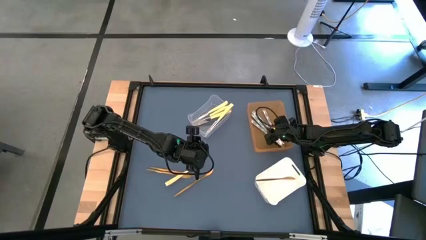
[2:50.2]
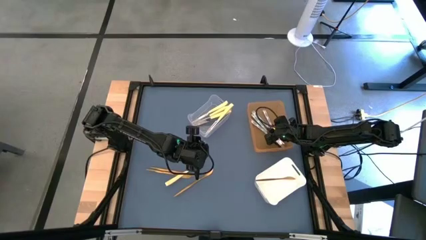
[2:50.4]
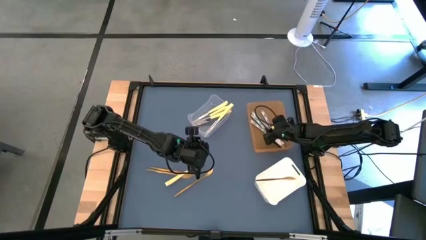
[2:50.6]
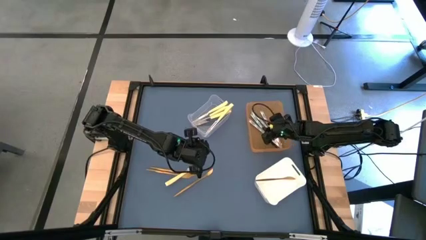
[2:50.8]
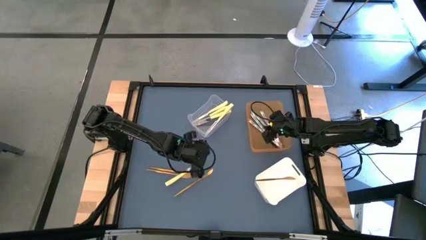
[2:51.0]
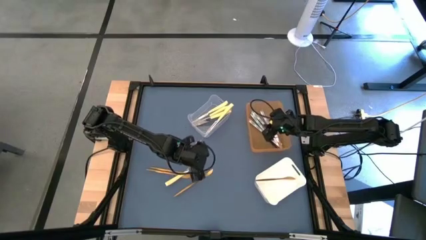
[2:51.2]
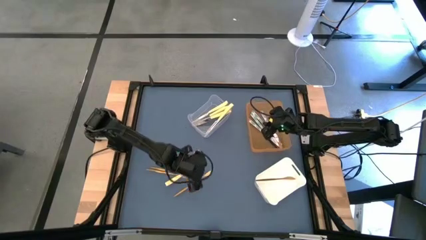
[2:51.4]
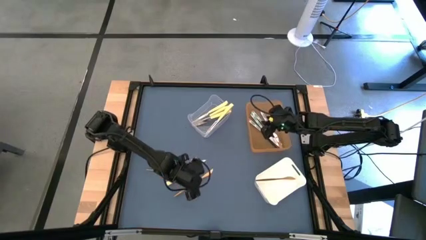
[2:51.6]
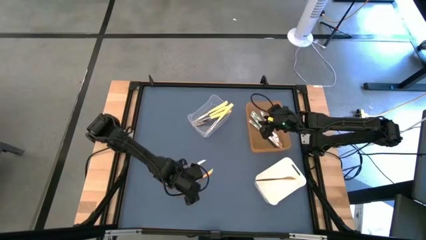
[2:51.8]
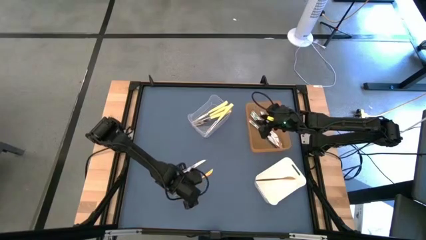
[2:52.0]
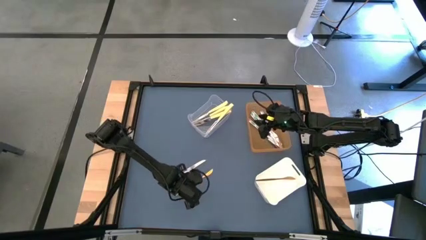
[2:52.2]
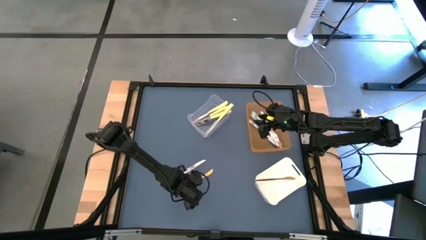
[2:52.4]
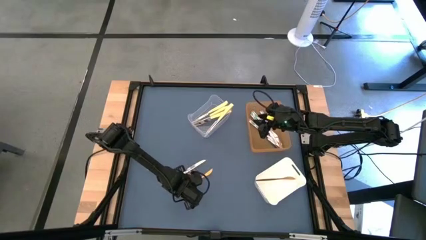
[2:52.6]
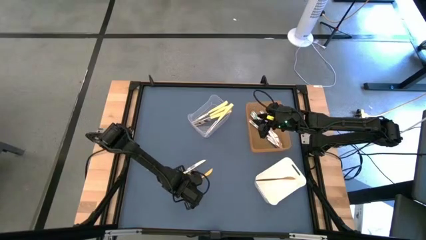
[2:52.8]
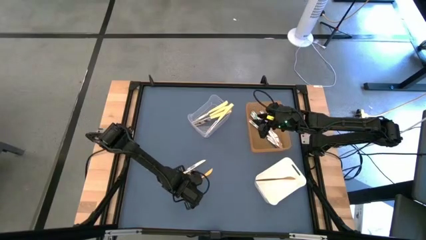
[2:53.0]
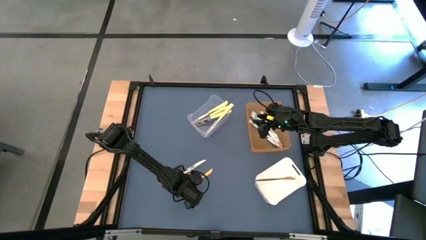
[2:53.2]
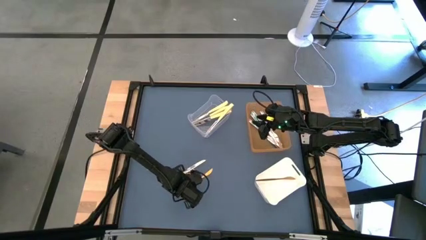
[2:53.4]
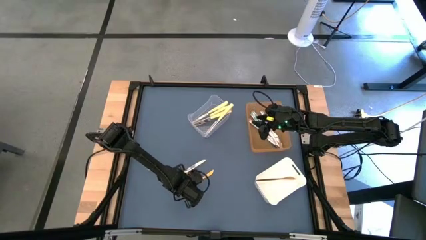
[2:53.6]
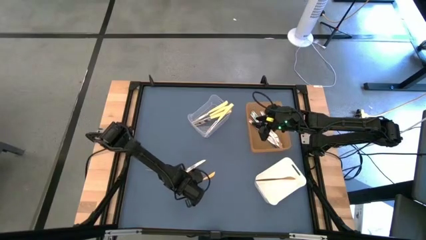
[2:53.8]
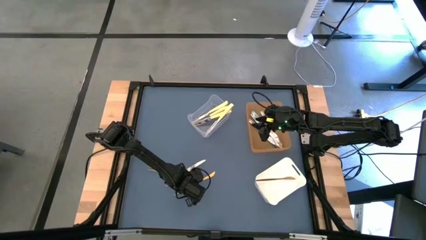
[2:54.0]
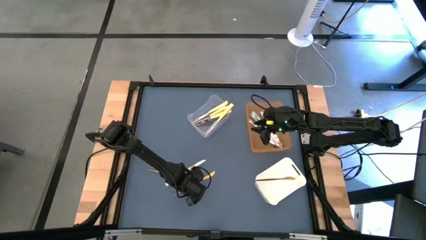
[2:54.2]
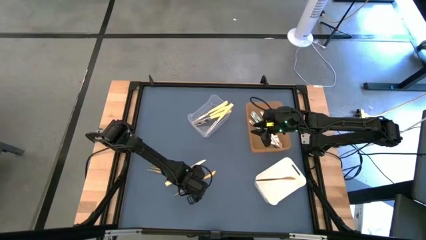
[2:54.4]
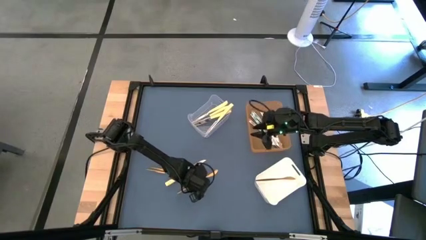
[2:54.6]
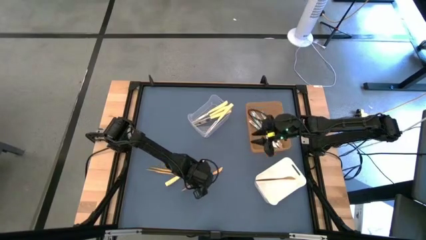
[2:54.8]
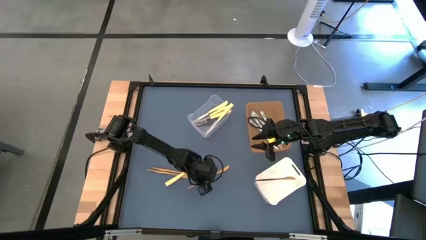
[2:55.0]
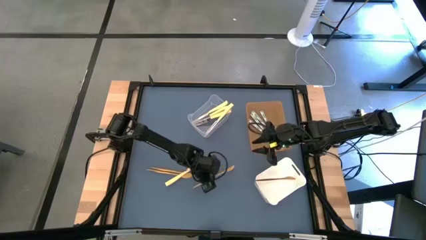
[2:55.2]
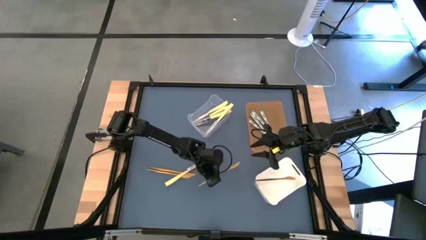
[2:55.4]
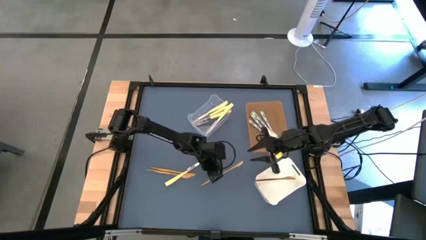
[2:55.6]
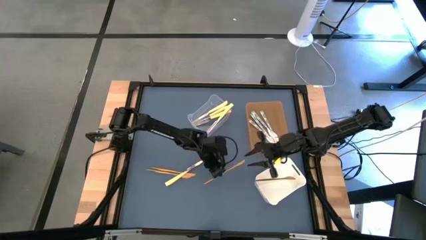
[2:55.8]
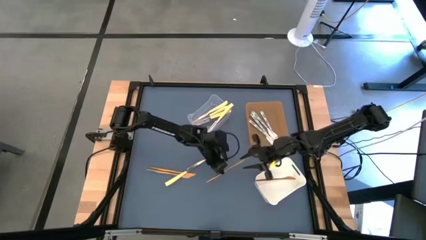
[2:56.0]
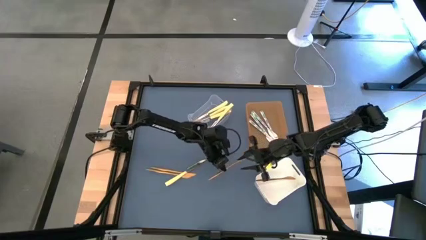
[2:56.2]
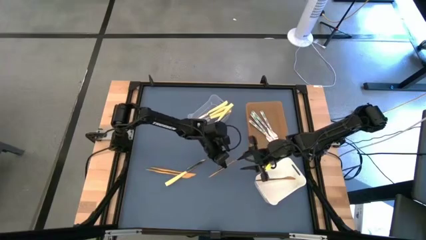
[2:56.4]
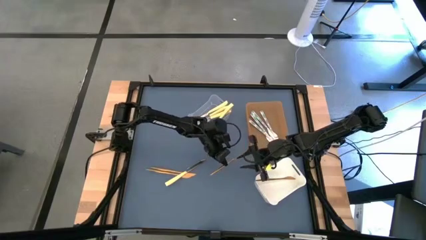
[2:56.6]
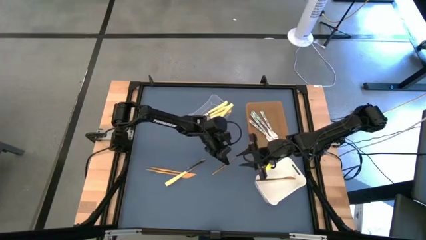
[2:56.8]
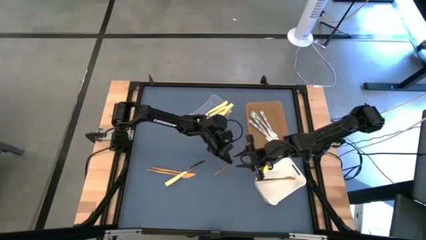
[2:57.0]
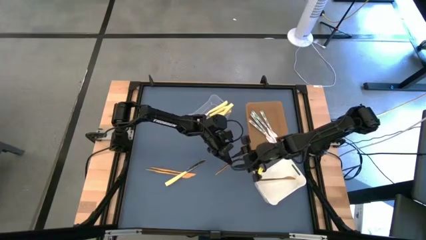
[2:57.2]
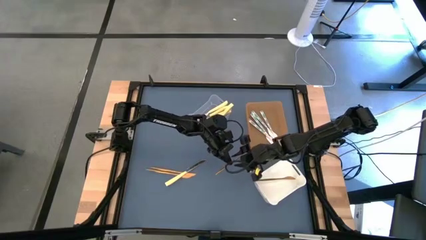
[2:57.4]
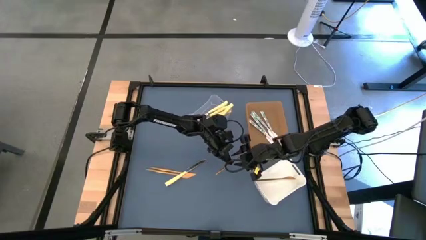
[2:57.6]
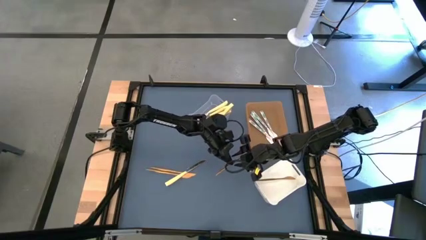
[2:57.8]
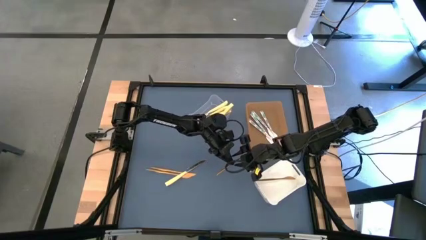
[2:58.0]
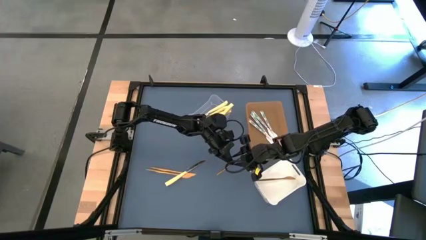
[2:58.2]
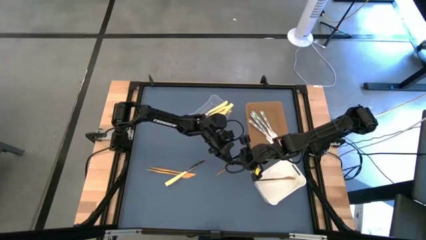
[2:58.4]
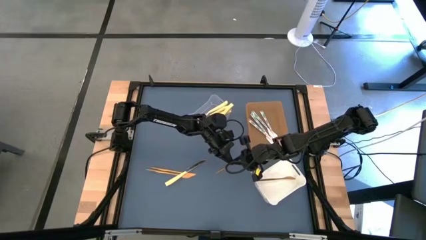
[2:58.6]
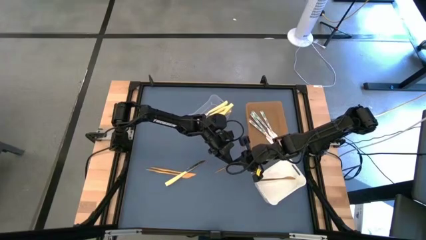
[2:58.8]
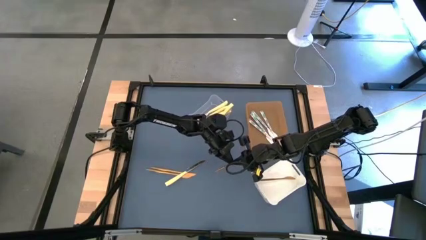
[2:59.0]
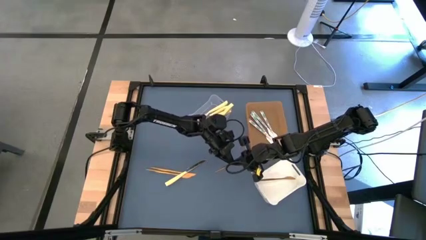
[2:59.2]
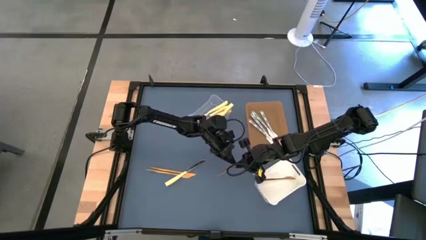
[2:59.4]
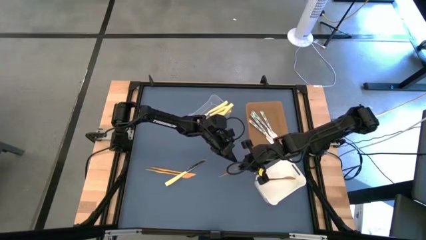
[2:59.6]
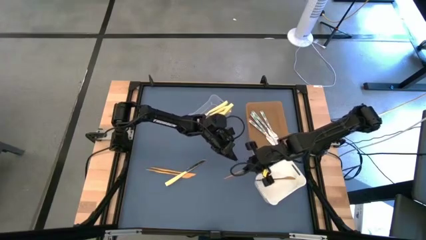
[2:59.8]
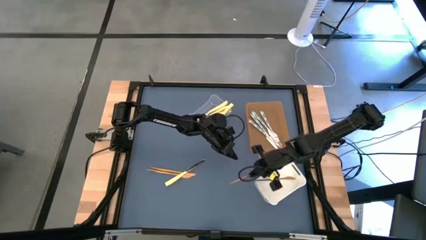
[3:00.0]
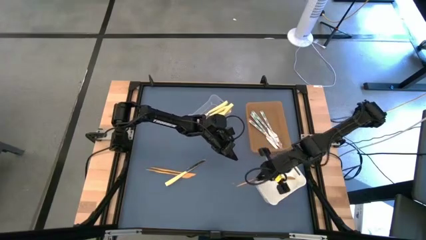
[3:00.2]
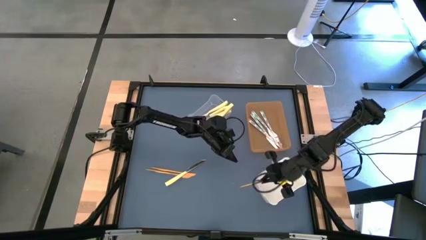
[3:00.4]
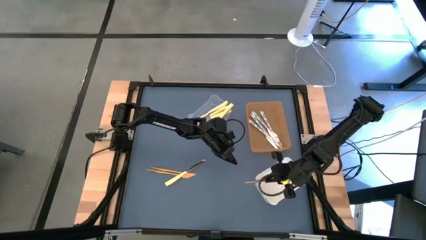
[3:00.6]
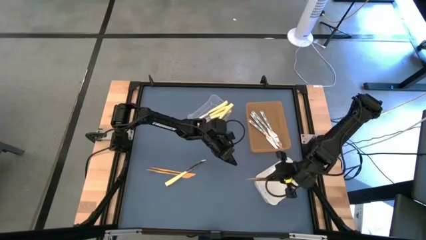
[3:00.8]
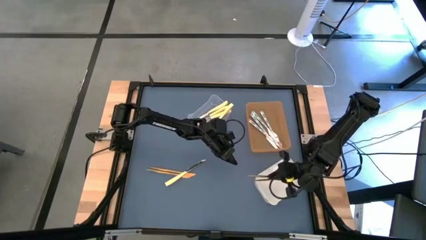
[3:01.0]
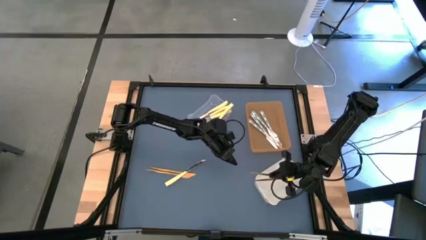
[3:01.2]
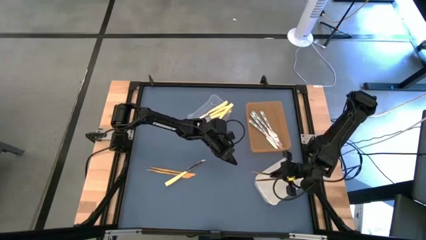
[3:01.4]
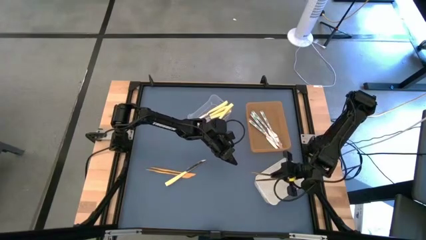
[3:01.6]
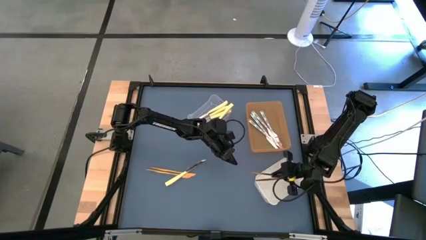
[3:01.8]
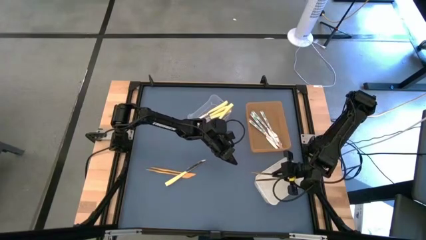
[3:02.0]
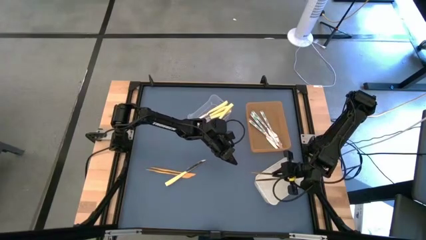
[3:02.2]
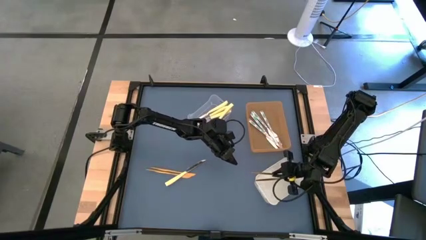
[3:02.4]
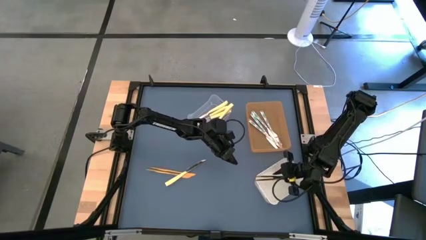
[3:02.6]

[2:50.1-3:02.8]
Task: Sort silverware by color (type)
Put the gold knife into the white bin
